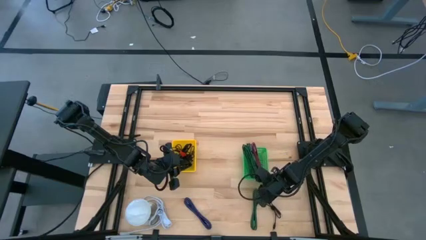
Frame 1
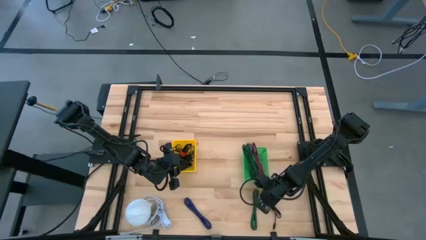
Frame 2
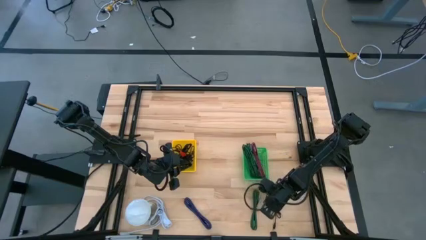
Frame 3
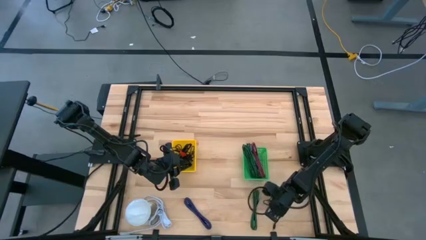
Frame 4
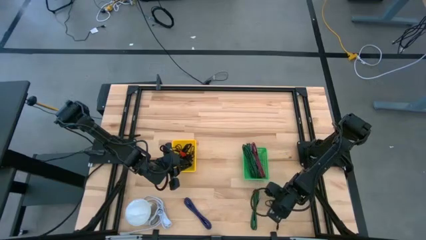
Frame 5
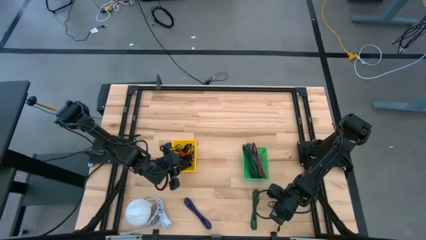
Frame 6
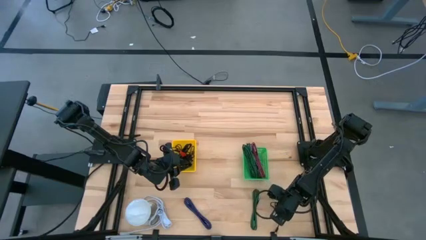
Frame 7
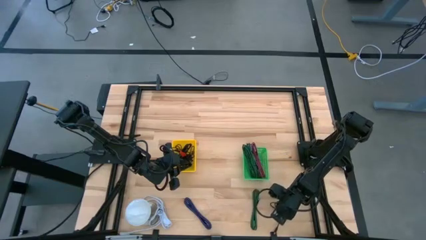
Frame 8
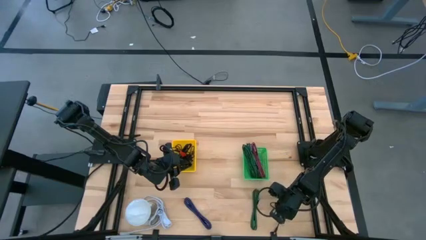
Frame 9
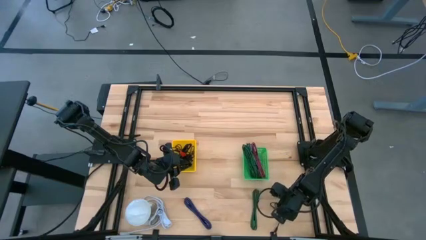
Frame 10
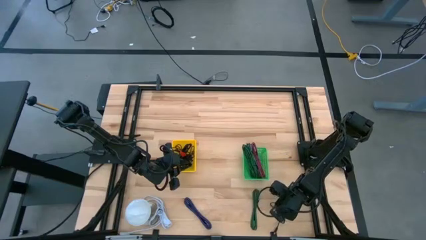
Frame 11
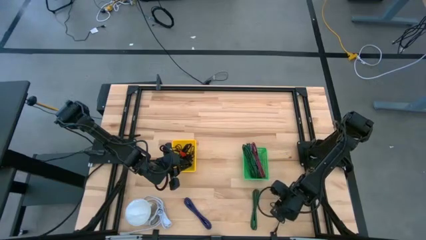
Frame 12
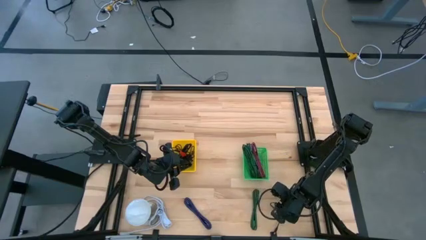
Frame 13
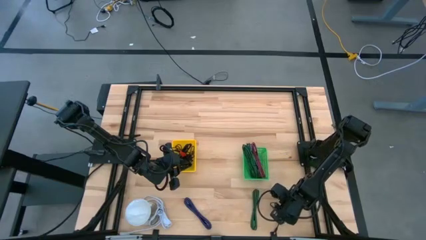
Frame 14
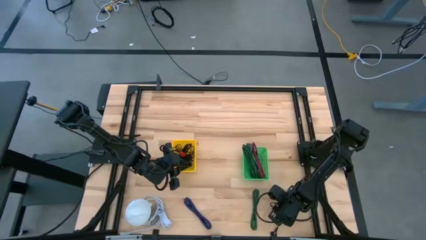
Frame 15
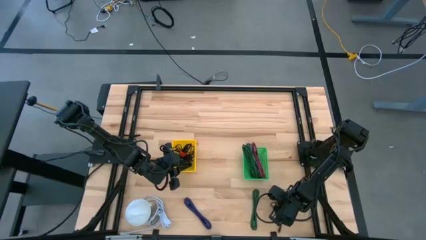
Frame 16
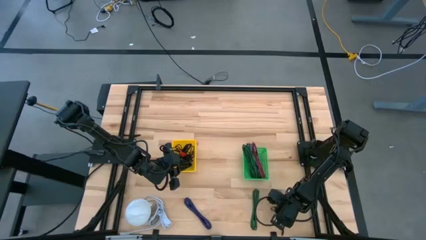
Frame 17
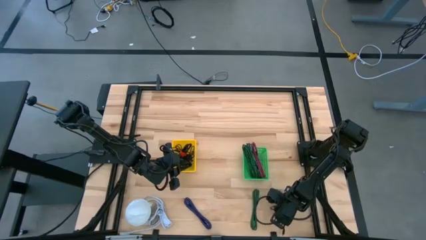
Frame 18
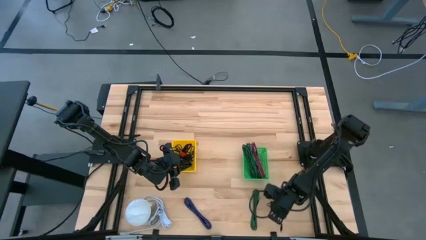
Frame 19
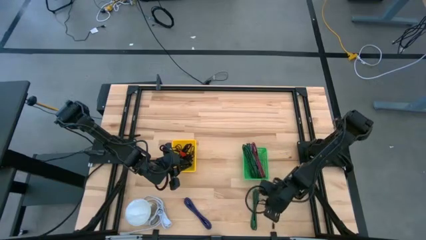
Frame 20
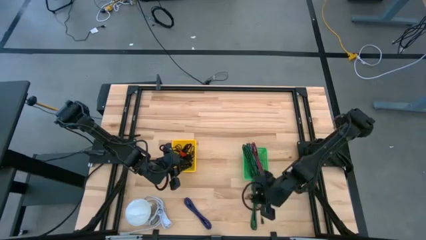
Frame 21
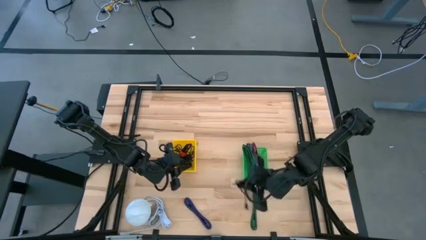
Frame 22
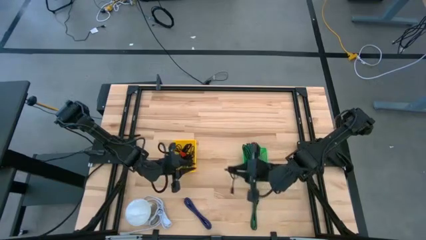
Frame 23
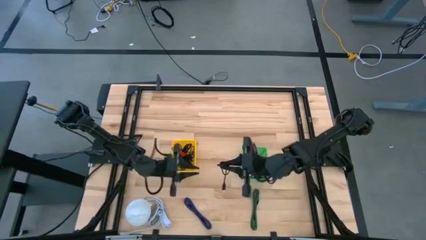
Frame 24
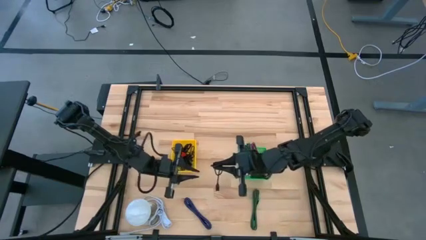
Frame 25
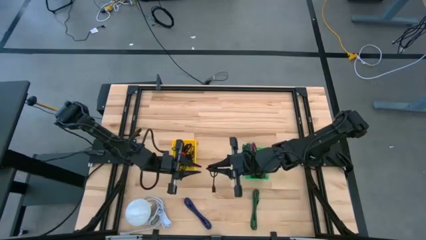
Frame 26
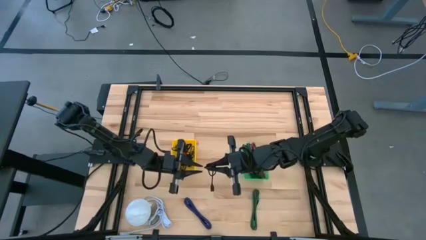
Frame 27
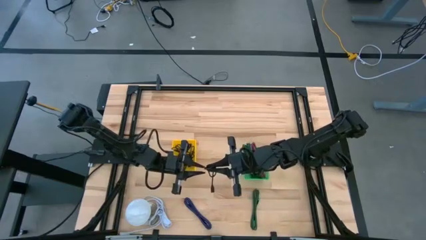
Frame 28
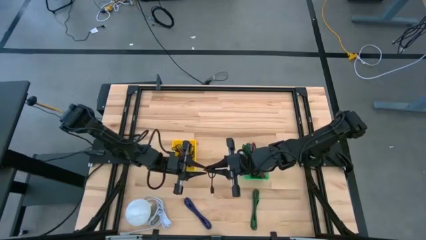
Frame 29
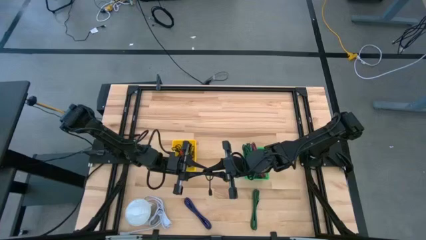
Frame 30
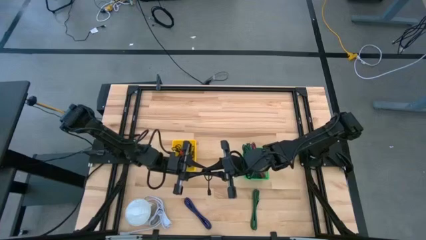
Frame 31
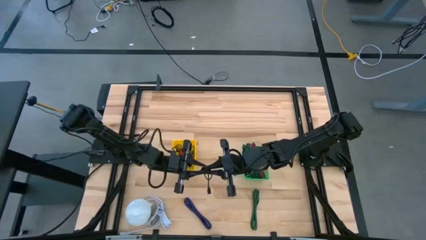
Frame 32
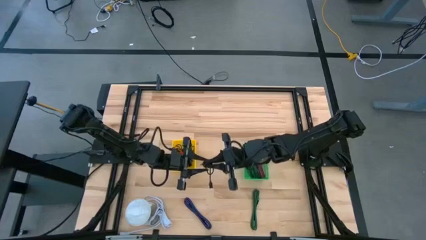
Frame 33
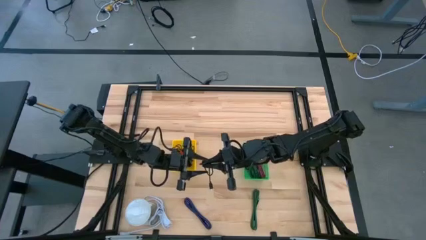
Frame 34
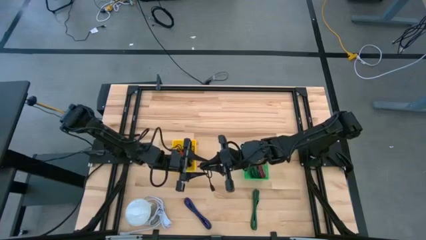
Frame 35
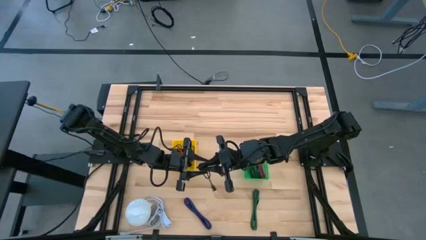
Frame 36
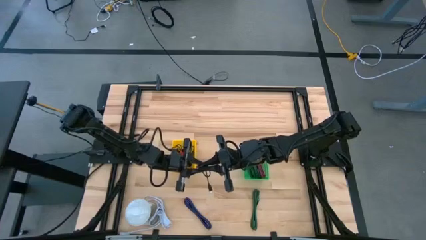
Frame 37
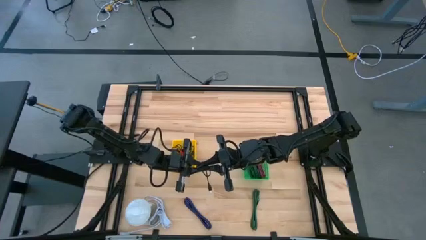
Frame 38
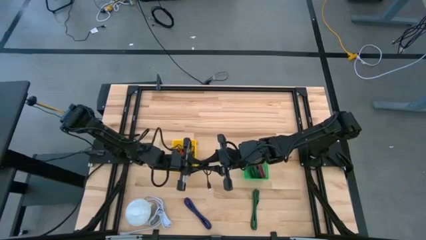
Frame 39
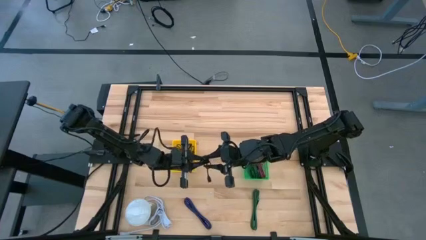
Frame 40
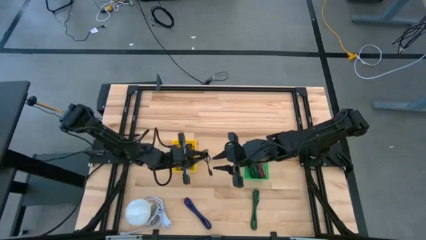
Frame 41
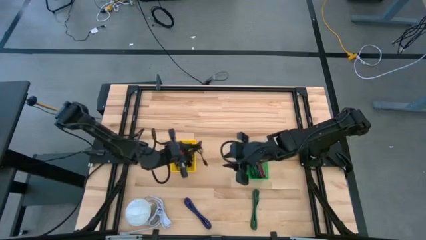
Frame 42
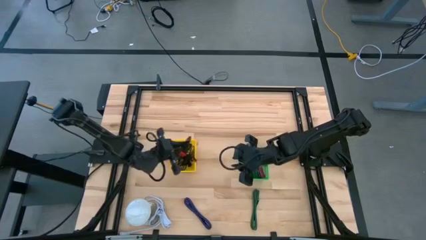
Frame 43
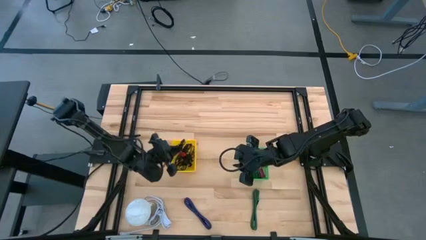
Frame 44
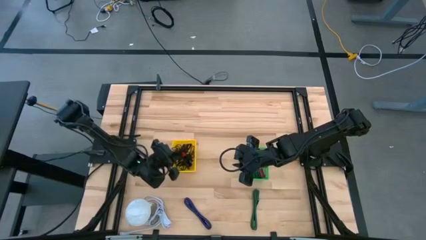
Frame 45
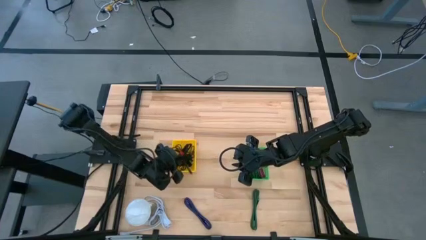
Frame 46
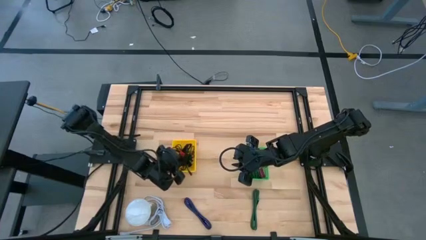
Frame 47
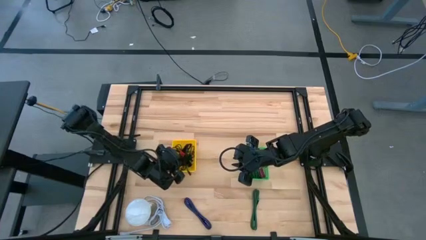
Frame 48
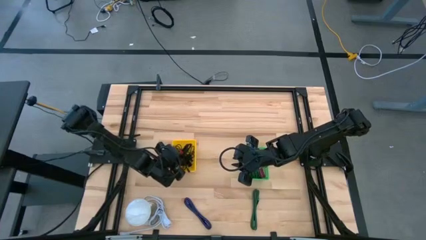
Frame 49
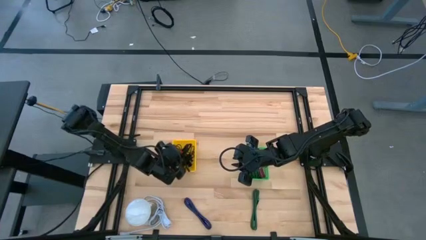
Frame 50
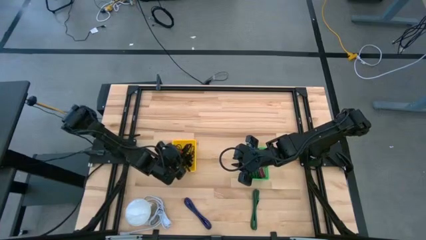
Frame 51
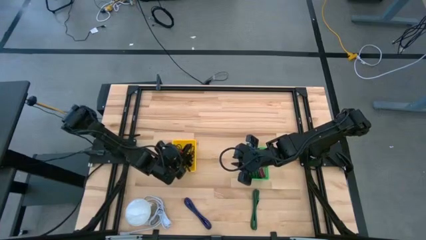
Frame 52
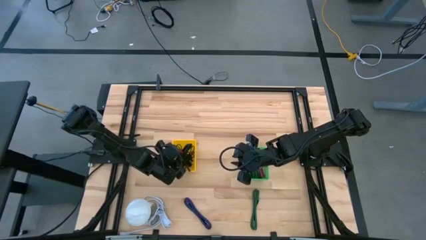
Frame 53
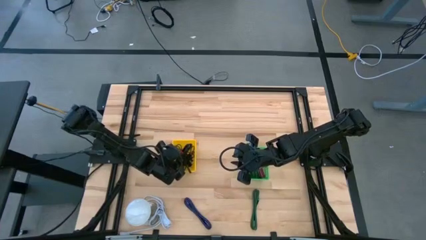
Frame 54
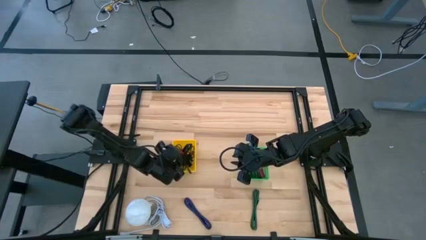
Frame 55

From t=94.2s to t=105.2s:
Task: Pick & Place USB Port
Put the black charger cable into the yellow bin
